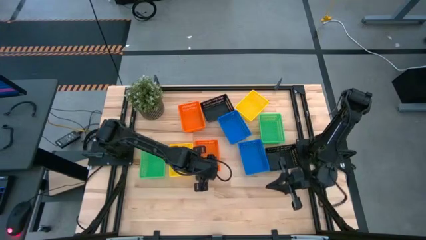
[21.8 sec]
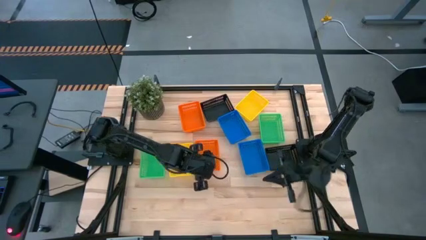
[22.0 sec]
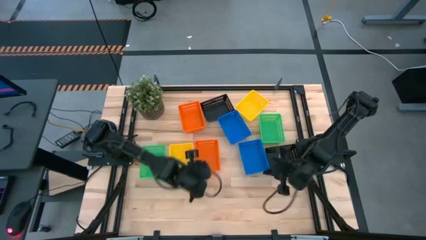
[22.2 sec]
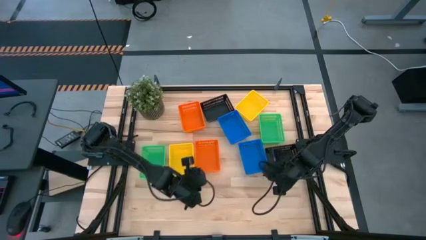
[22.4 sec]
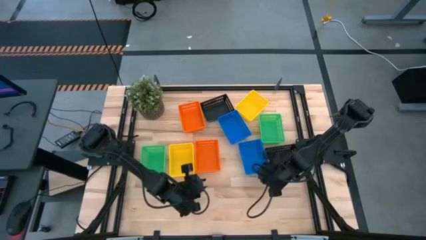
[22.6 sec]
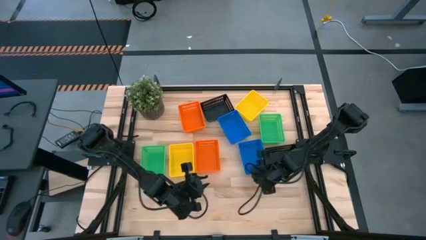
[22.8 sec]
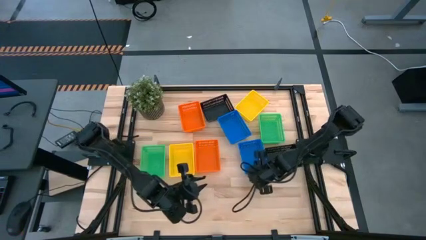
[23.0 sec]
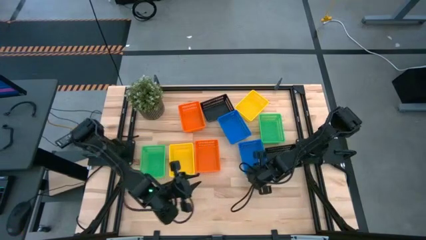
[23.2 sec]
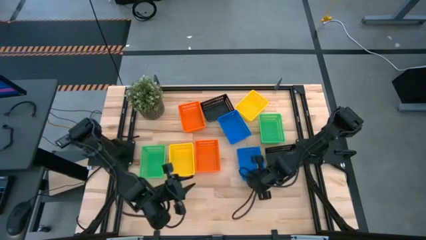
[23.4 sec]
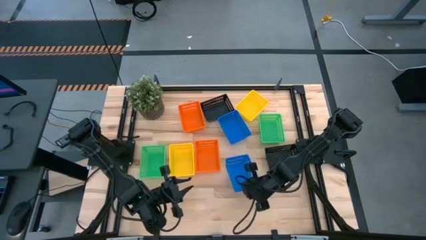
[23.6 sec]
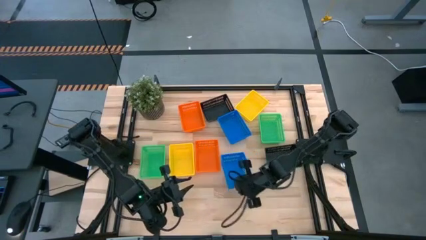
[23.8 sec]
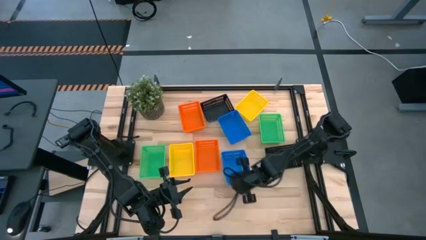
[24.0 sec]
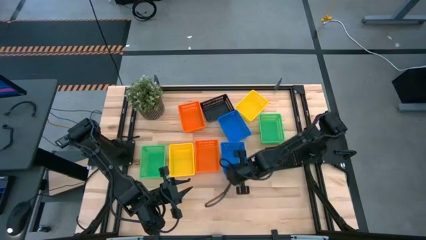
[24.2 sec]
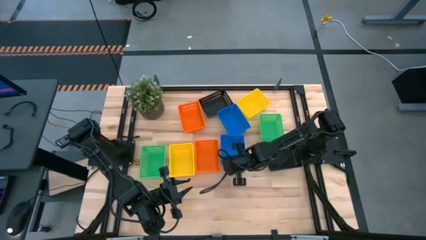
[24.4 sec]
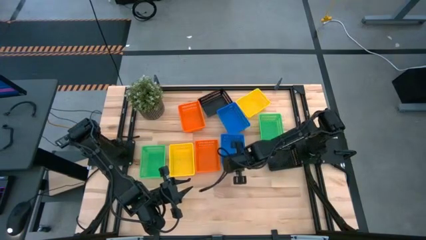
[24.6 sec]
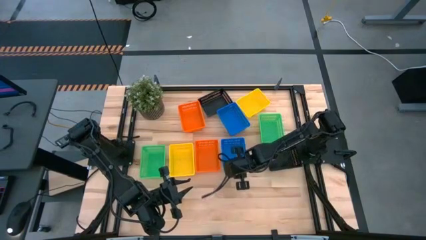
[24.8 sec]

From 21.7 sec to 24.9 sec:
Adjust the bottom blue bin

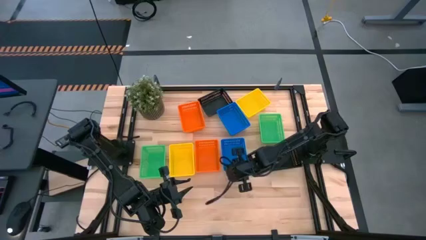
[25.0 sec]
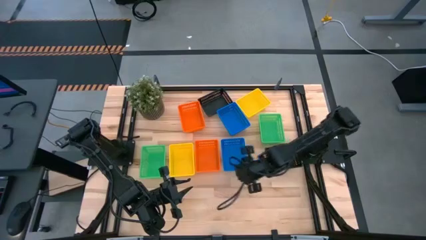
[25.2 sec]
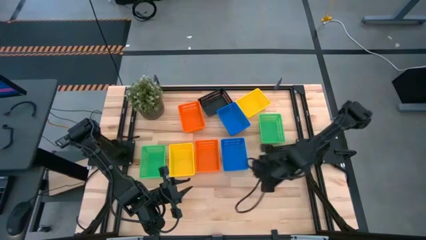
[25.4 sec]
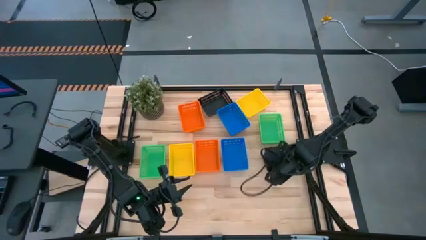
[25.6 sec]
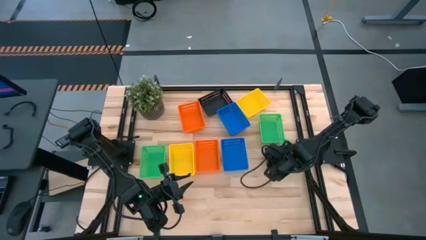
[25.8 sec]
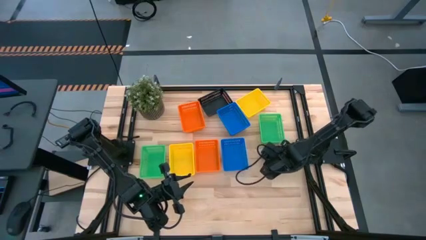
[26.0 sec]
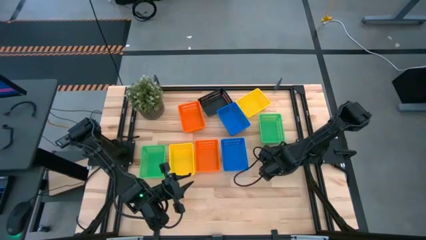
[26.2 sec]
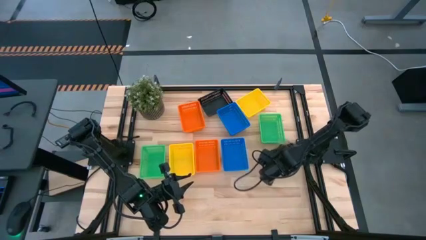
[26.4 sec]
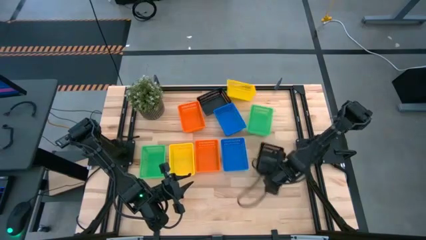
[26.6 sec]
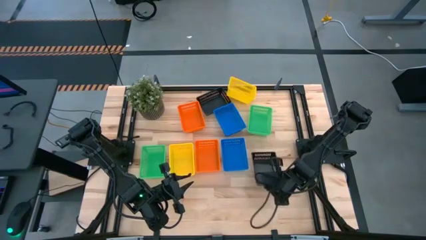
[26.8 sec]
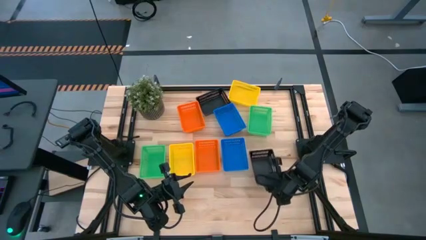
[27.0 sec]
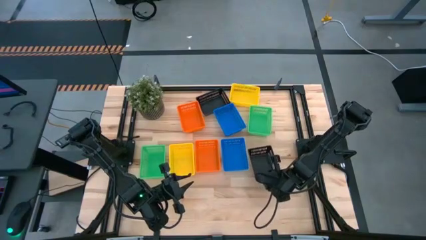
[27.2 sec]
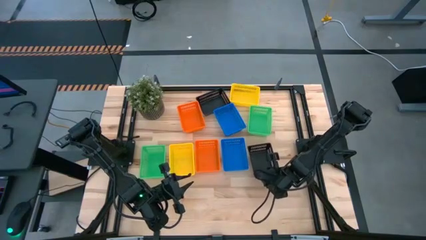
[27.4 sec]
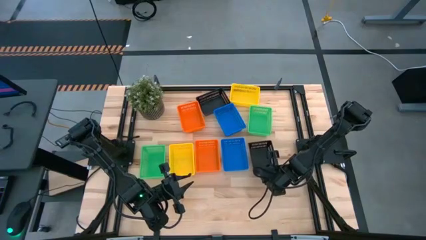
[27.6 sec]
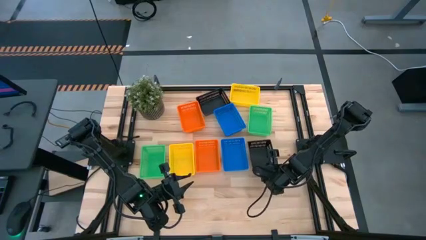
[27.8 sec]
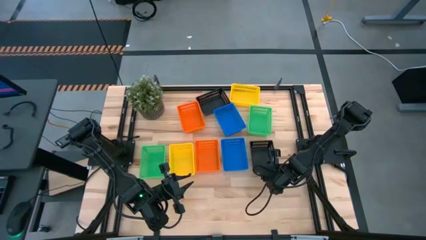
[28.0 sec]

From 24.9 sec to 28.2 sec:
Adjust the bottom black bin

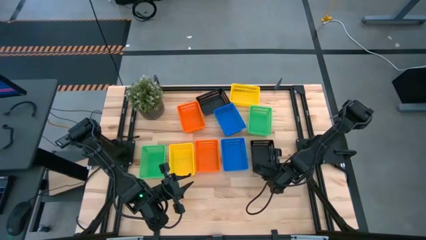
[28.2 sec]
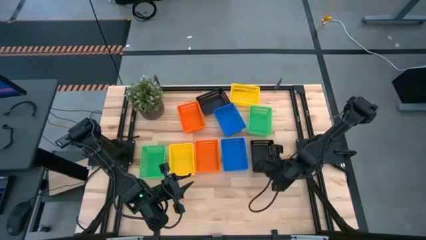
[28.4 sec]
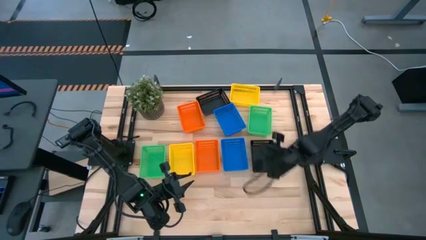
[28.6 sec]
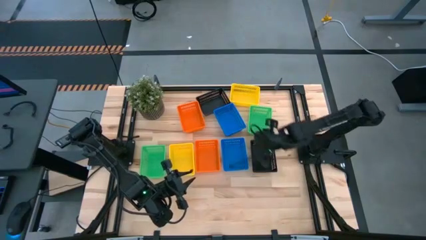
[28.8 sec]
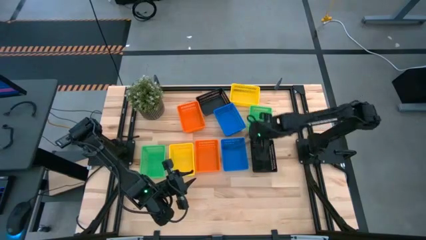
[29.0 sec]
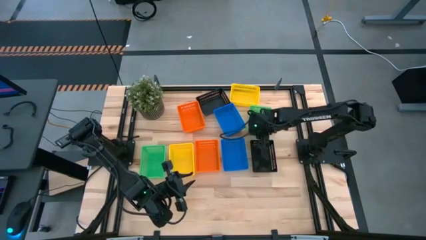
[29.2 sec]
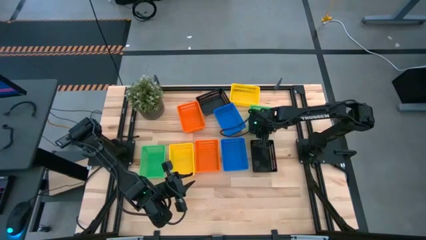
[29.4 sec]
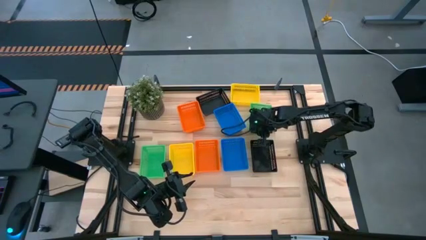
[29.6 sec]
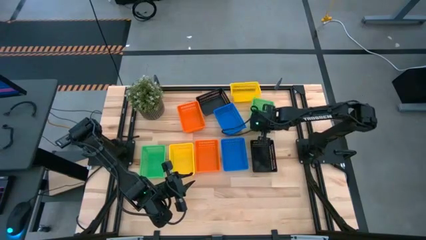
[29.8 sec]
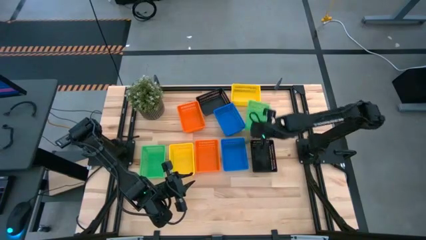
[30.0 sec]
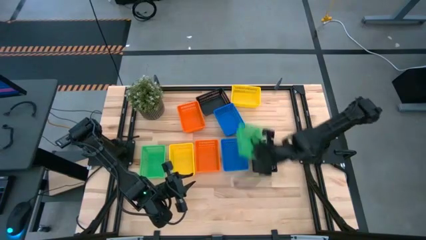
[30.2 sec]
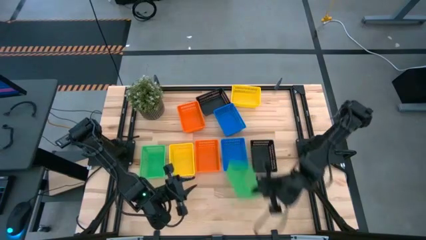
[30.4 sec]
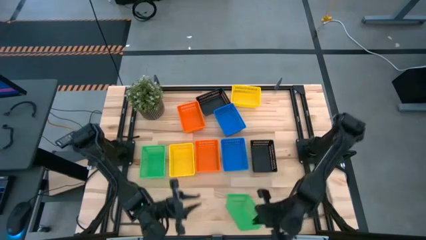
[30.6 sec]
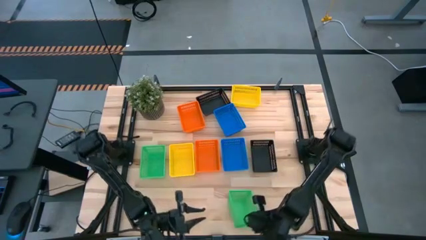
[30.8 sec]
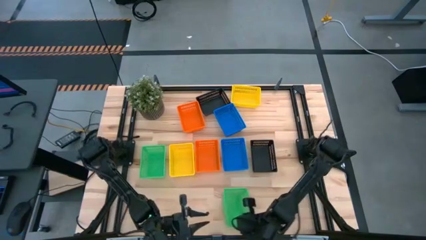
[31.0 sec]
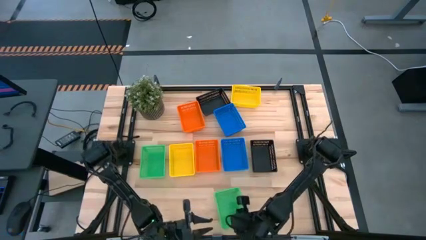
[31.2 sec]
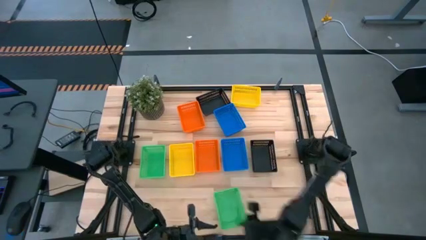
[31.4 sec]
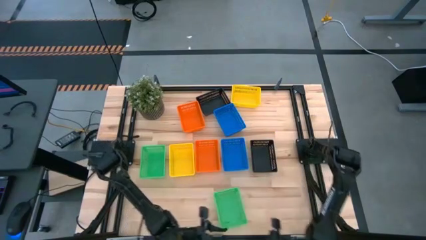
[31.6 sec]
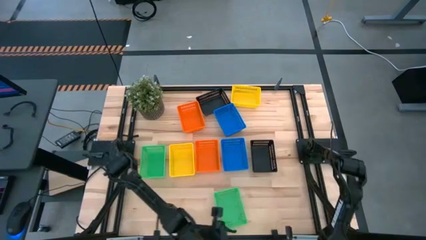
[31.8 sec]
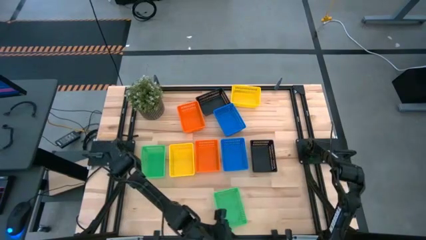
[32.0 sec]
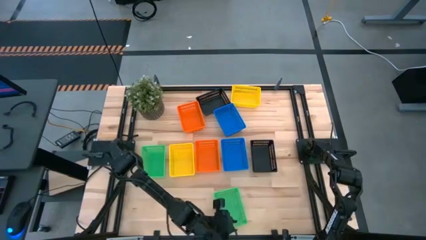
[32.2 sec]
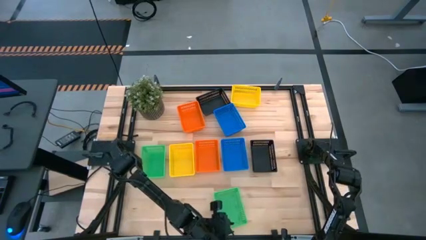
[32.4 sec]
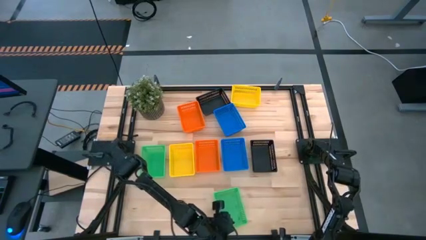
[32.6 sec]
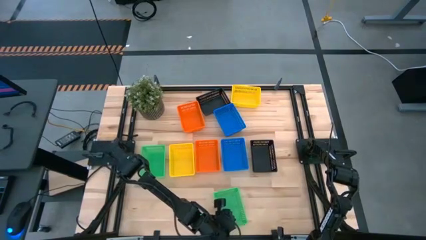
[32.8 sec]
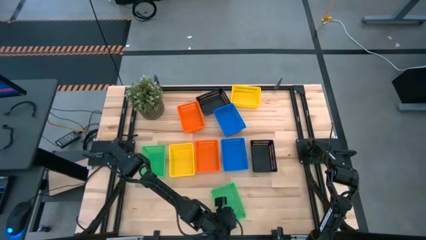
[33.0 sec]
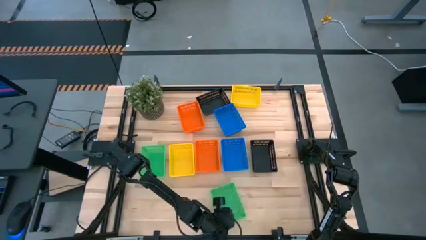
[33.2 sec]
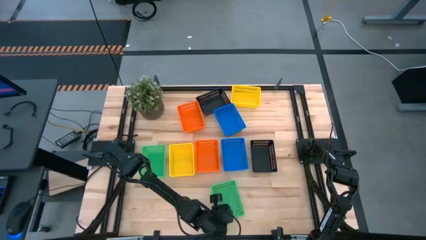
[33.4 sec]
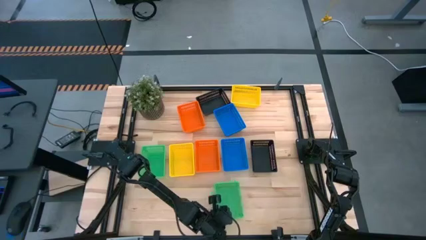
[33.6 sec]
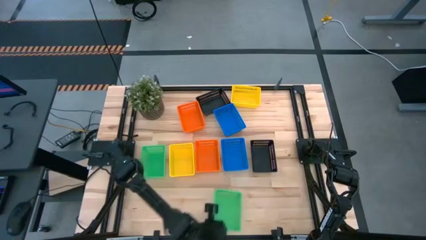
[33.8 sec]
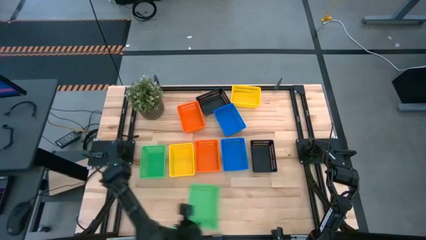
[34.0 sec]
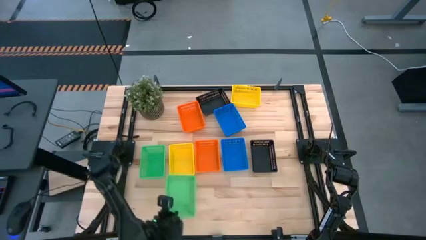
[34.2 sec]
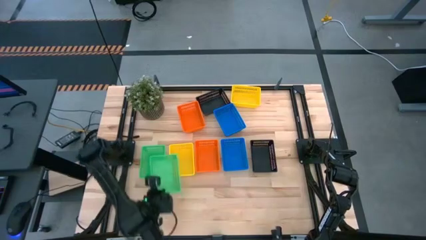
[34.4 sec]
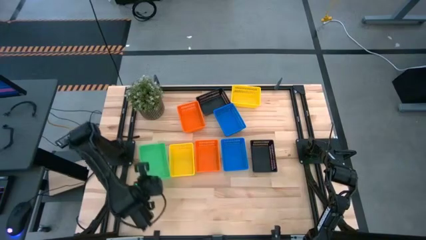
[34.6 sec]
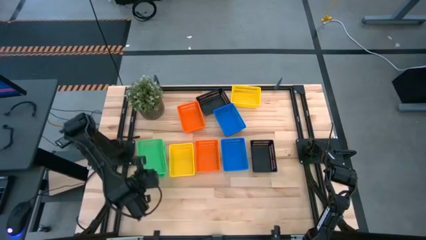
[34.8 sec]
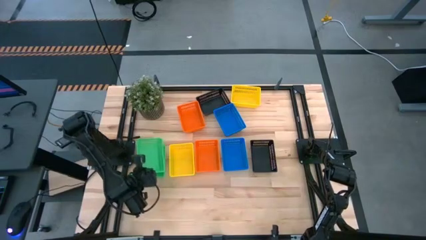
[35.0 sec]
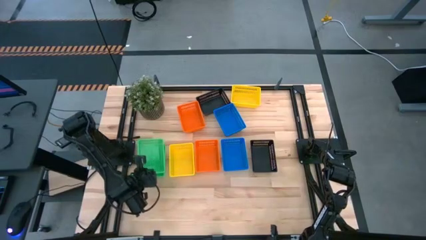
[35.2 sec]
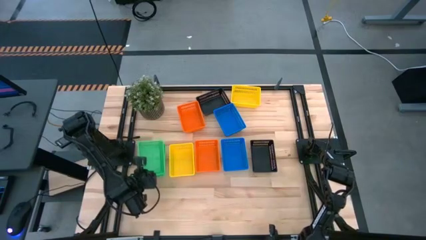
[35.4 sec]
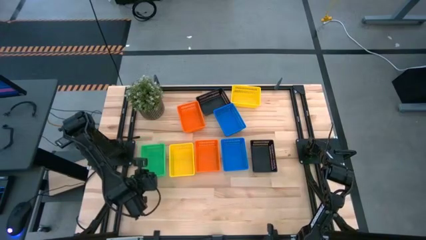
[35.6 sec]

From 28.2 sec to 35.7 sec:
Stack the top green bin on top of the bottom green bin

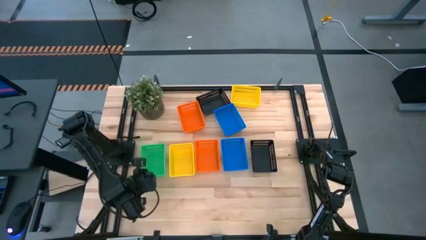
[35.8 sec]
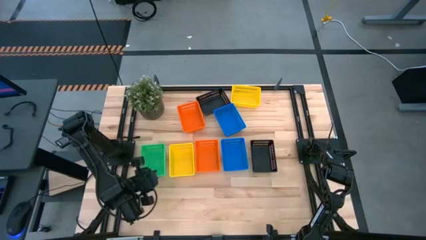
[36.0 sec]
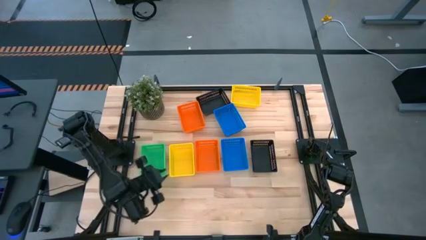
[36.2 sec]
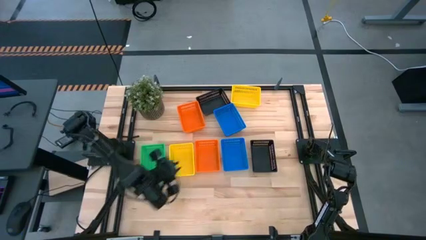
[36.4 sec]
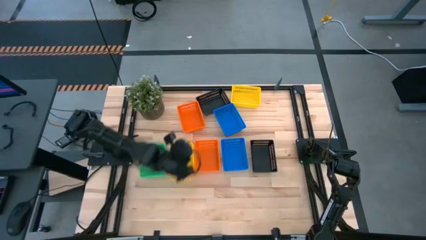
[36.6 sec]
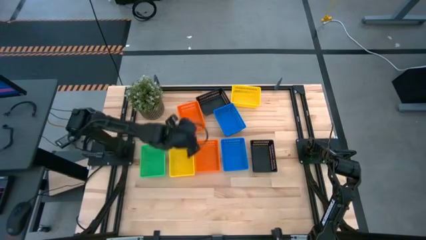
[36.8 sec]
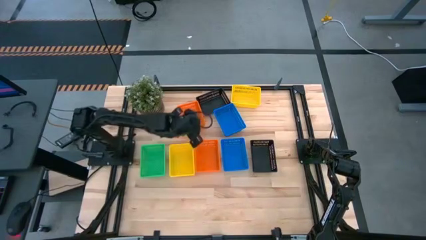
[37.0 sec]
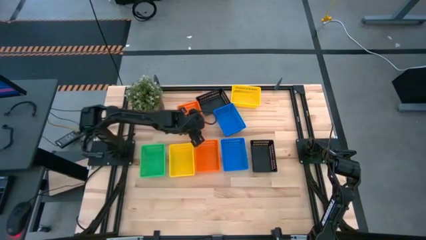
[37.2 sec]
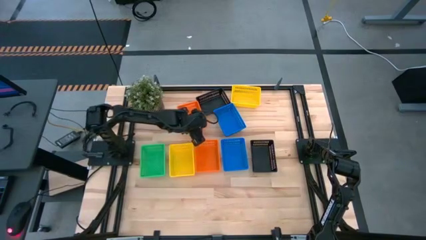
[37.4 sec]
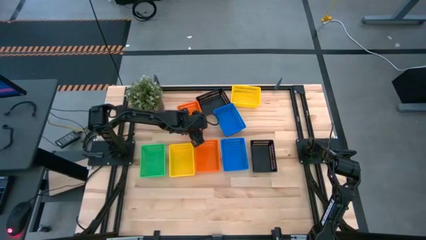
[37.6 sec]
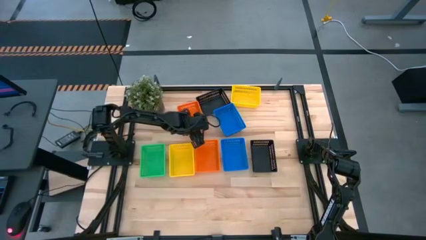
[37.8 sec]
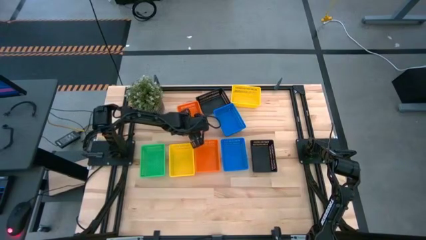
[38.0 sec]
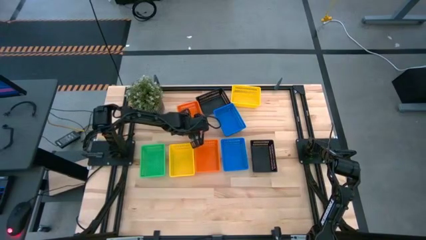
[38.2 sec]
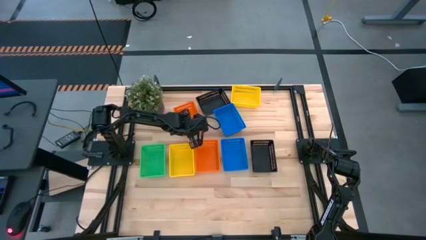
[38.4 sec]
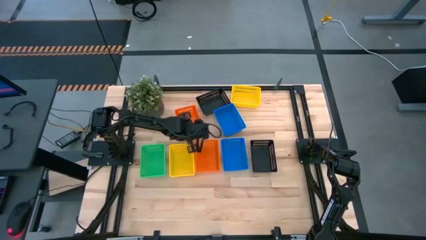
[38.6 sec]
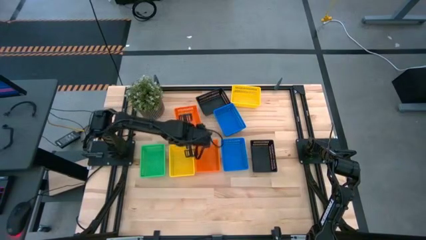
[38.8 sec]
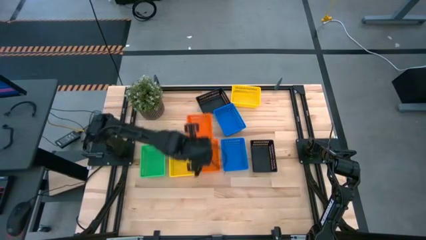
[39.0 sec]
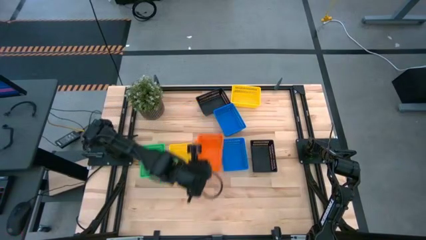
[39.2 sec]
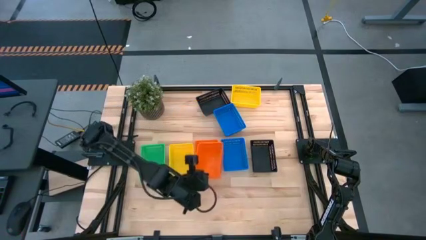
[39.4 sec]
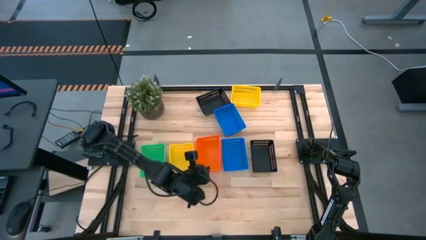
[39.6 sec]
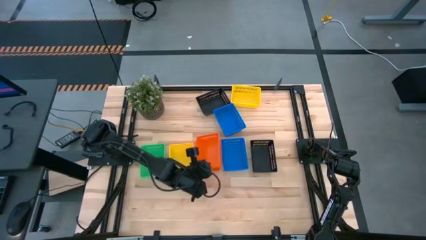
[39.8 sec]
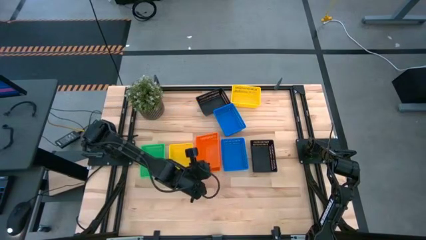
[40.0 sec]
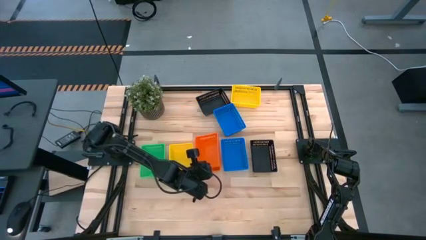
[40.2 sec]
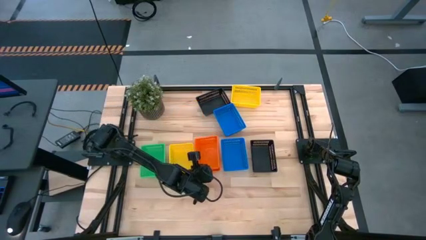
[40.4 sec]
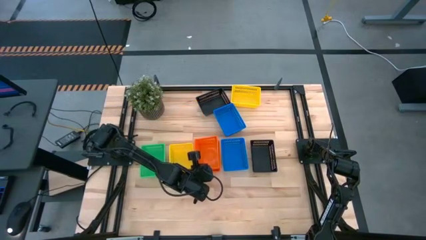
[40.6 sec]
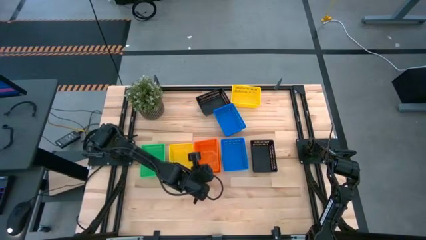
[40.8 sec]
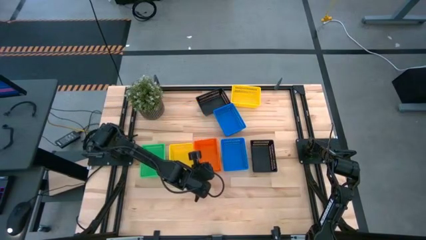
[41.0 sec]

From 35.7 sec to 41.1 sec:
Stack the top orange bin on top of the bottom orange bin
